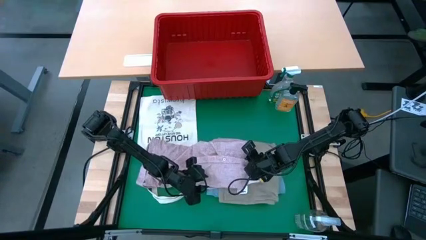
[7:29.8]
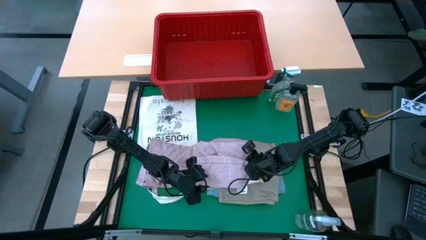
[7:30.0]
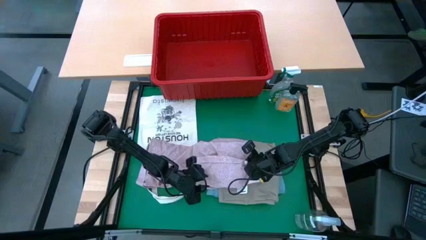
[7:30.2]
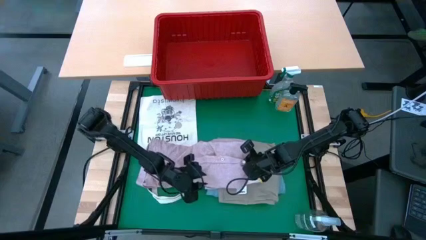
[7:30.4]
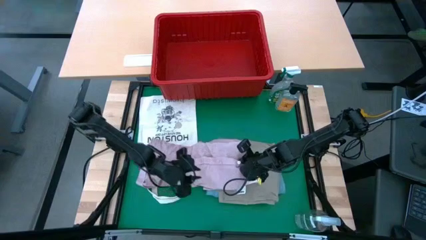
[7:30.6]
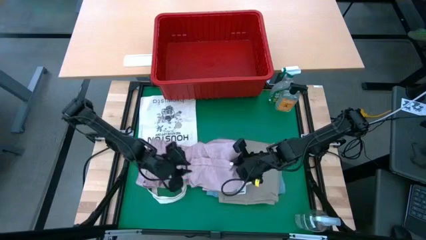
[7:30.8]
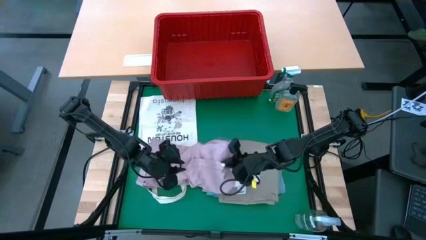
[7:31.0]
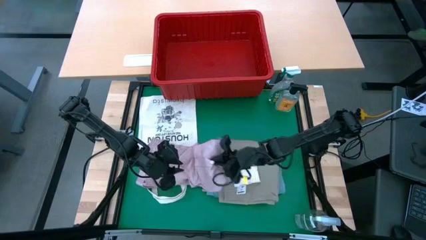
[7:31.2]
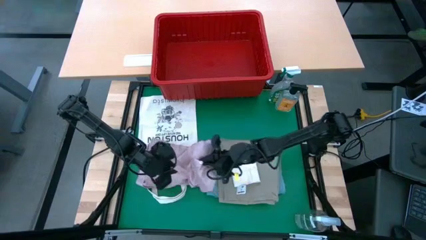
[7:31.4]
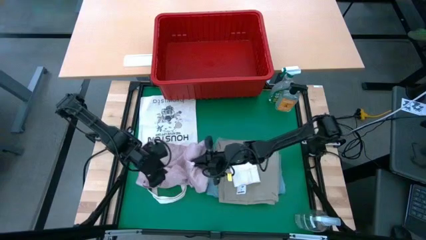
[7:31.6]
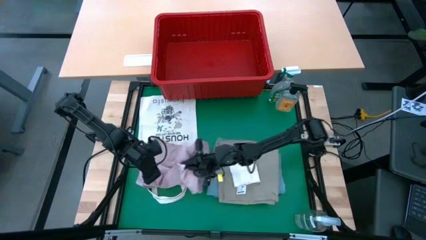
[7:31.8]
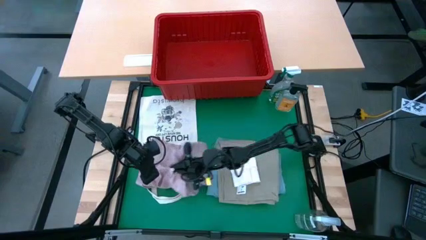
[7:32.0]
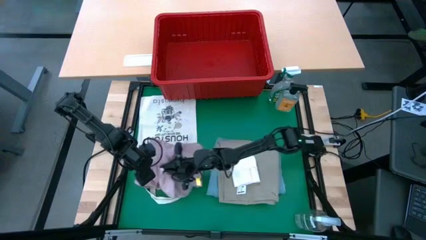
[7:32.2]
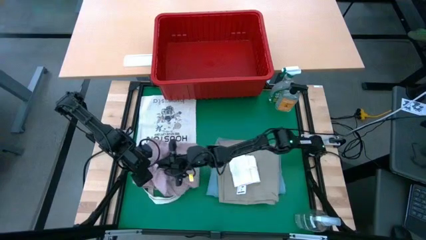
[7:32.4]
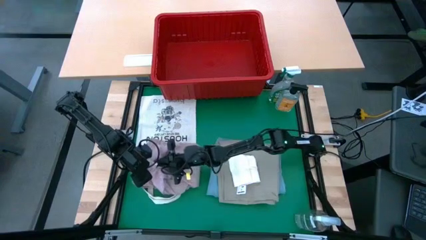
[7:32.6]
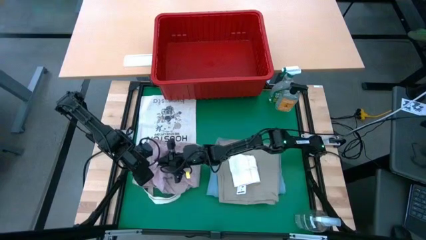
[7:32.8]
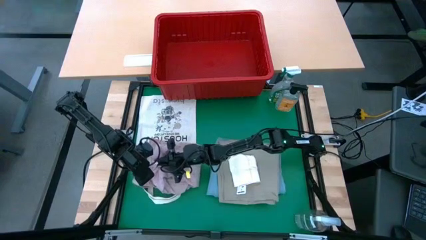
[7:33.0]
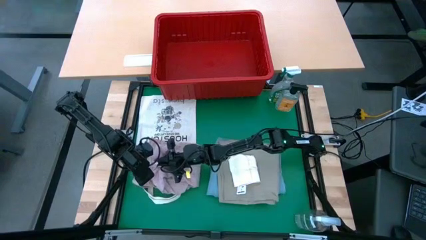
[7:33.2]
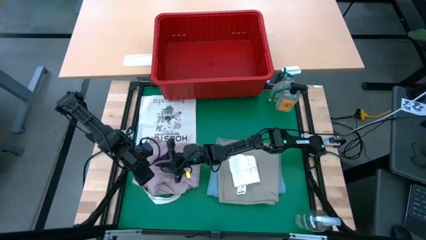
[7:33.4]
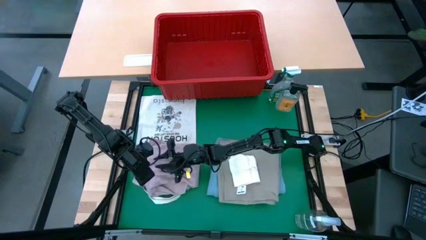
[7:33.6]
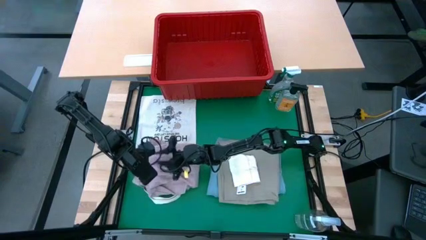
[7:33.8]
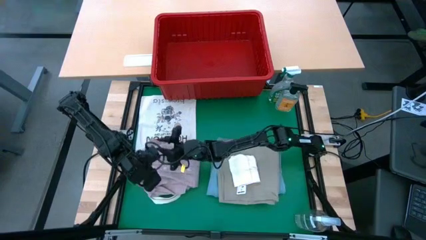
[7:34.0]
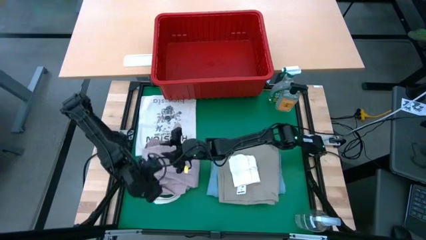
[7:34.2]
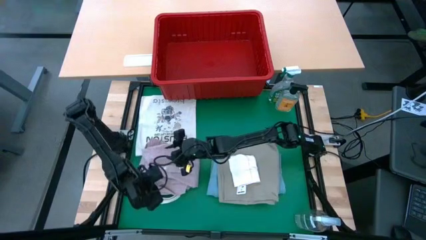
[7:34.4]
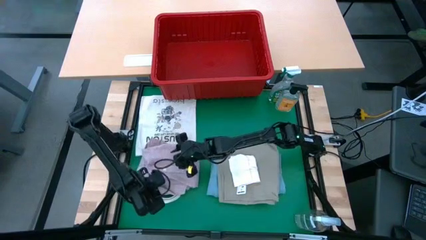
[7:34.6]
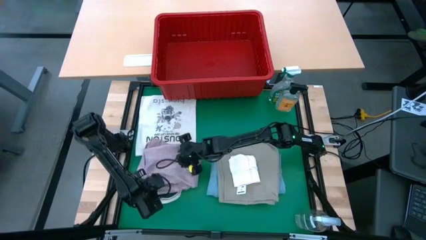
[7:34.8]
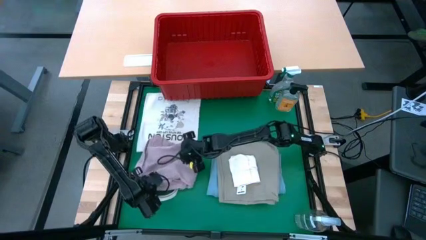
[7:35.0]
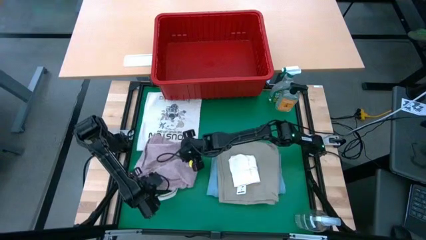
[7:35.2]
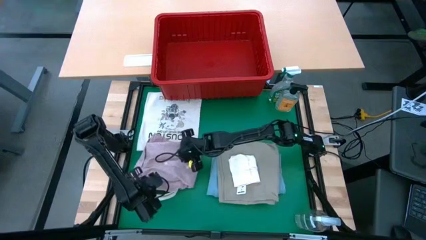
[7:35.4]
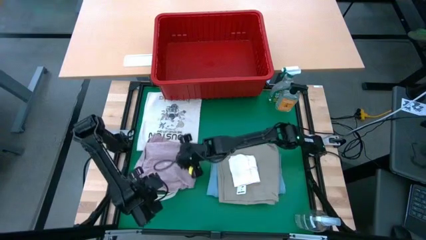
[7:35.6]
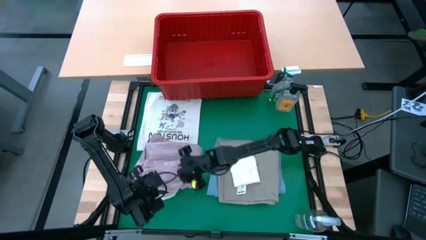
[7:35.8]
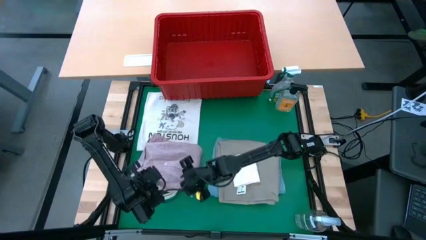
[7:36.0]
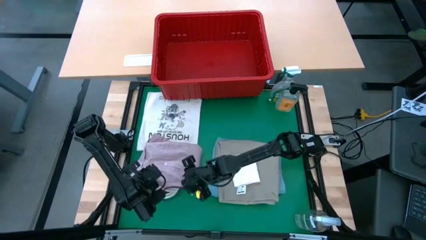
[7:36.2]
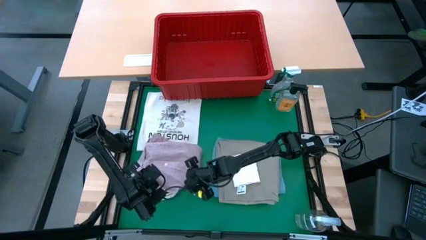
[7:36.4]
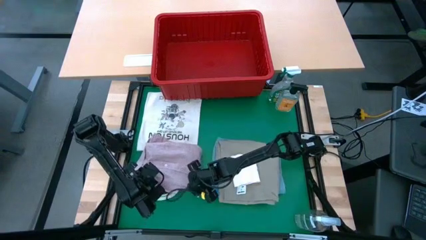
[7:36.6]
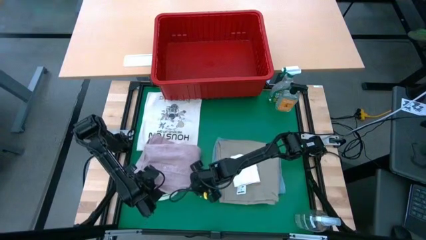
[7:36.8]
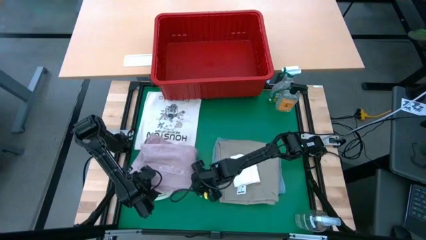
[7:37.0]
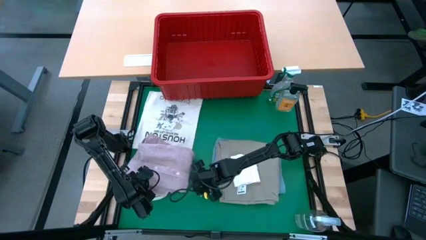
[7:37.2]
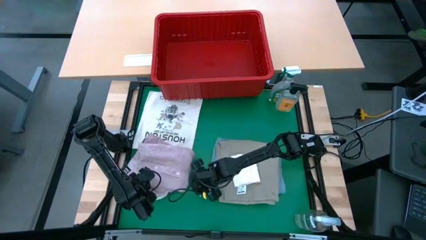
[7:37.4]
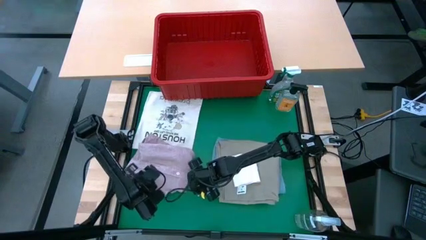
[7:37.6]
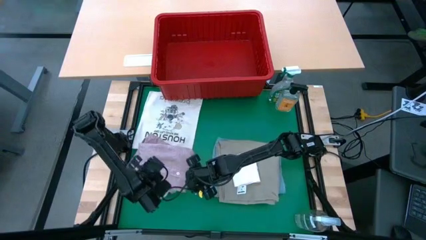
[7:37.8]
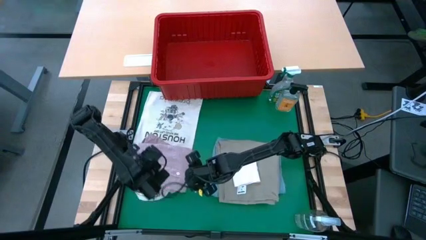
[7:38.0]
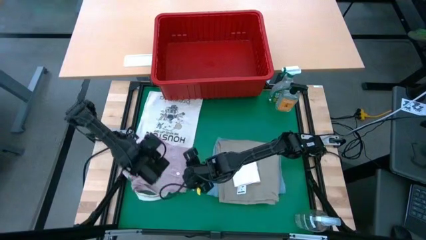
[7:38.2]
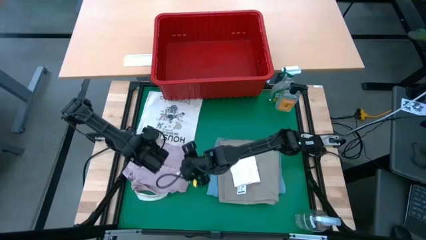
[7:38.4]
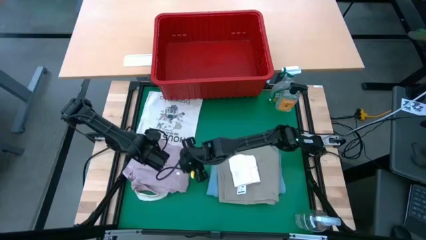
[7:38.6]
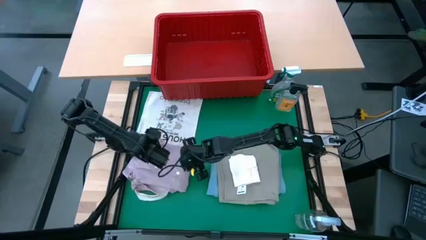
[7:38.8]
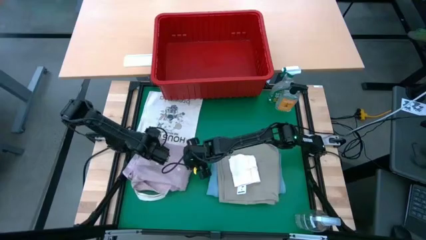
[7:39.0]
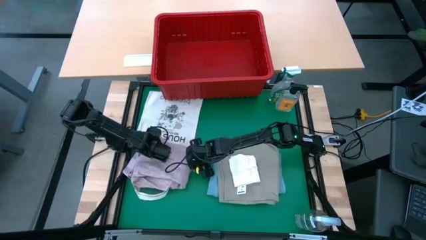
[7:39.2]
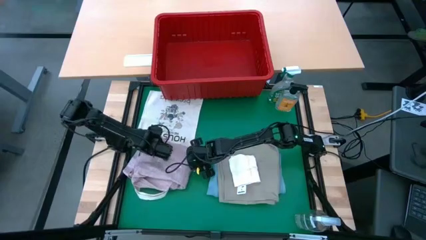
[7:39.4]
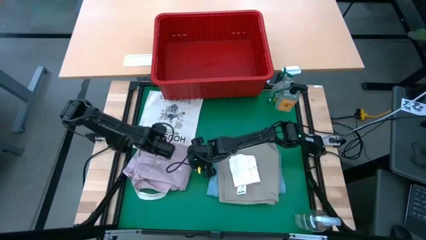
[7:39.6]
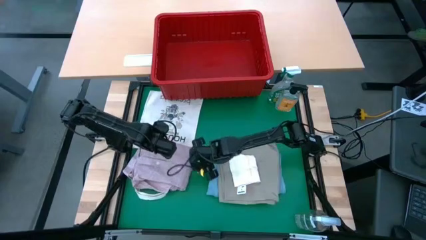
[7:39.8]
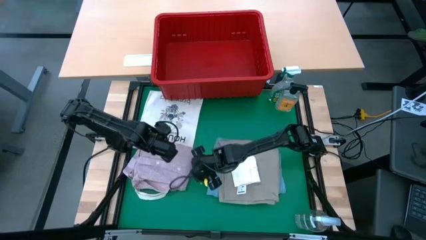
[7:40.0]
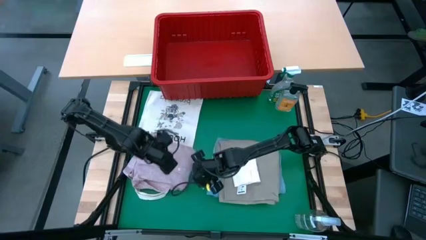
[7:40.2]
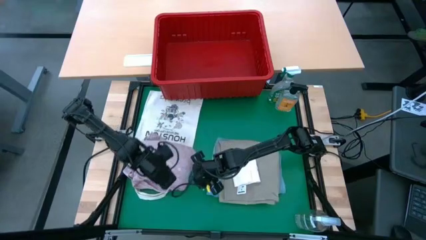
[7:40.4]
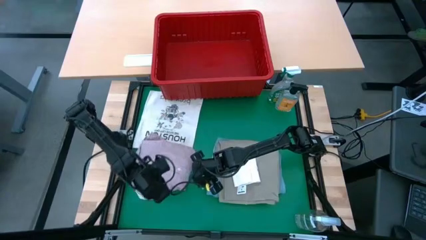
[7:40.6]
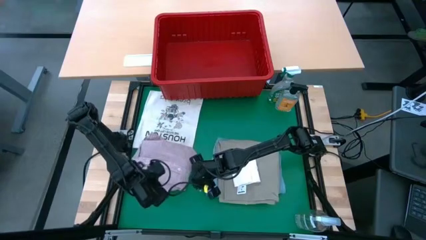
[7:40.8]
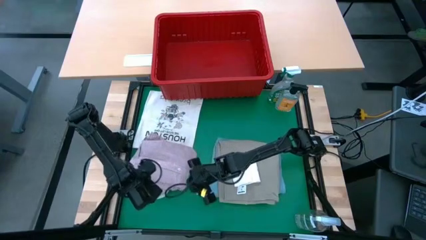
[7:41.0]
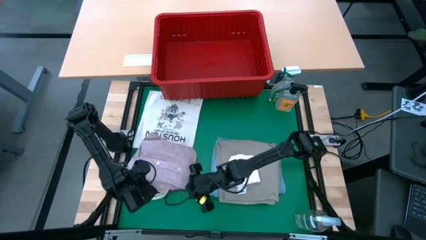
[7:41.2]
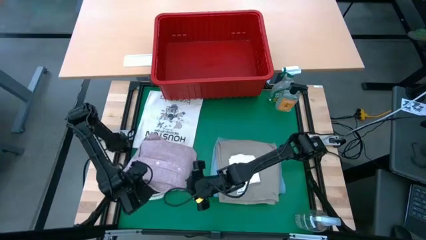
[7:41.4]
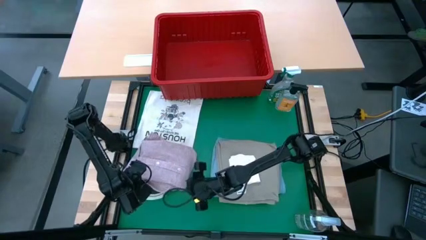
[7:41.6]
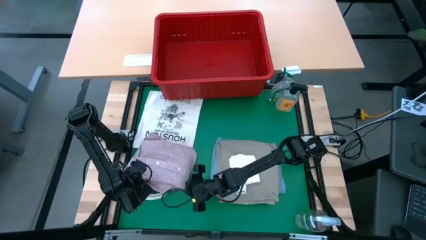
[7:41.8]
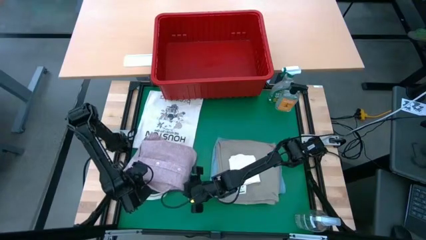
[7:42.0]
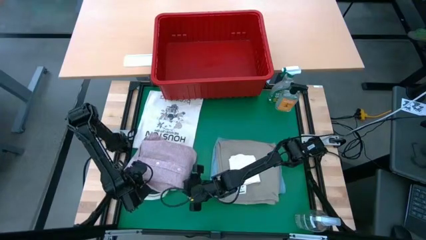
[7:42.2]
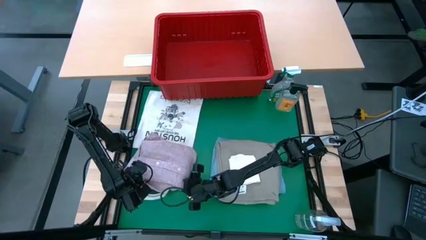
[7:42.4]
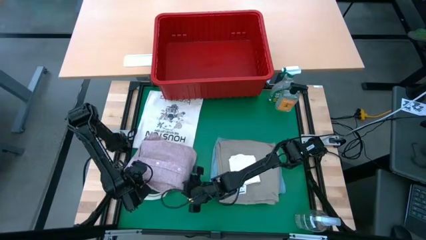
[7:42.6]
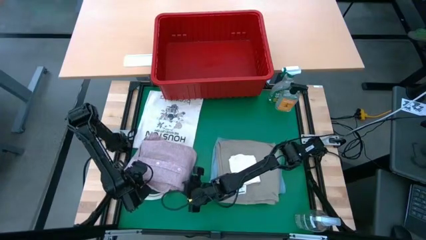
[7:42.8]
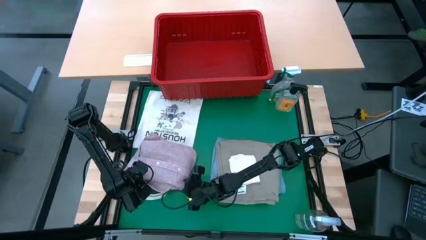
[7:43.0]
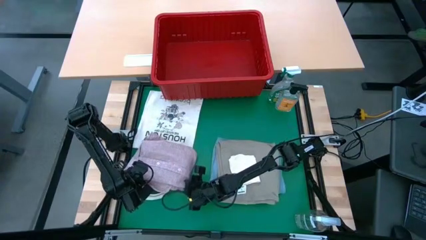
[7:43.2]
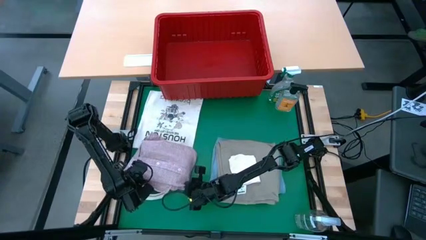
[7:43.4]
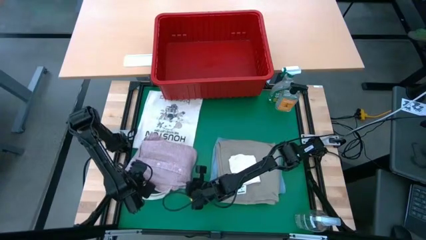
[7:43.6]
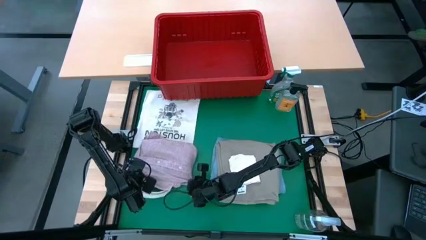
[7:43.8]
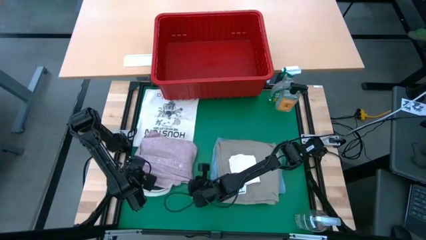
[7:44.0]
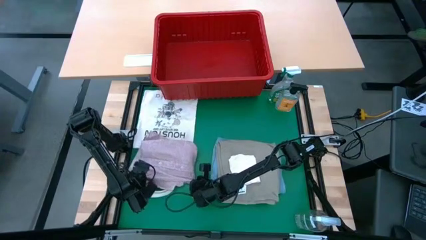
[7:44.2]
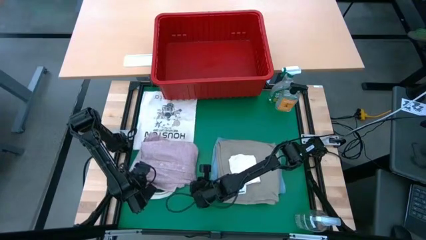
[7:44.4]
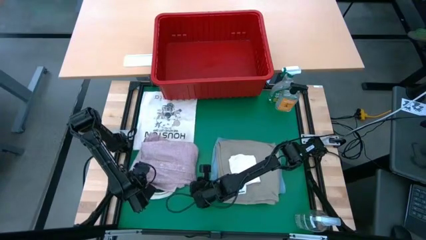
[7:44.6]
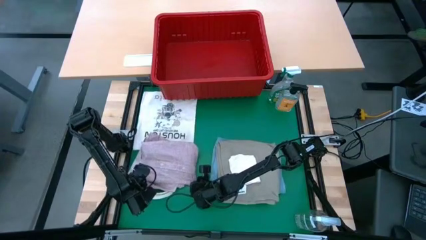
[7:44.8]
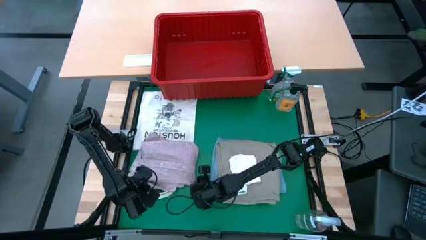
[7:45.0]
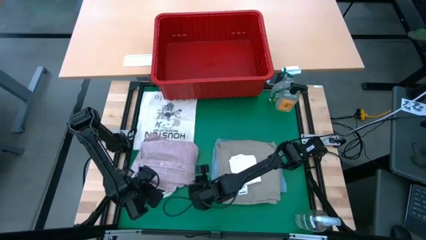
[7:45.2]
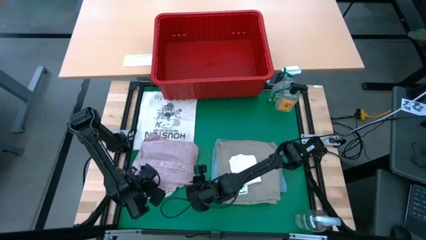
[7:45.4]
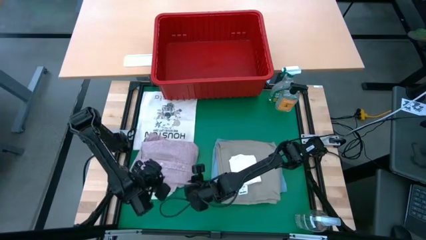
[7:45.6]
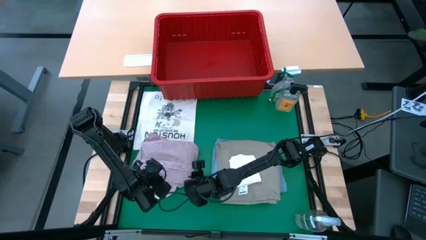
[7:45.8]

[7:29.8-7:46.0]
Task: Fold laundry
Fold the pink polo
